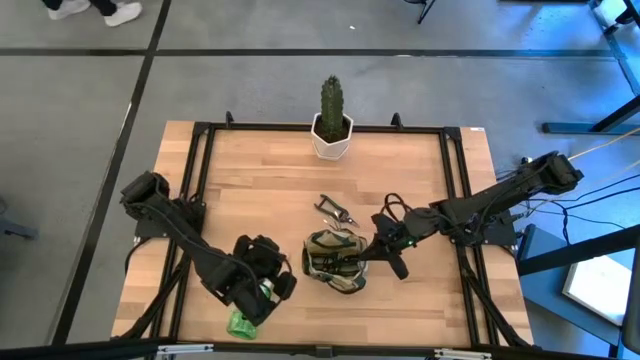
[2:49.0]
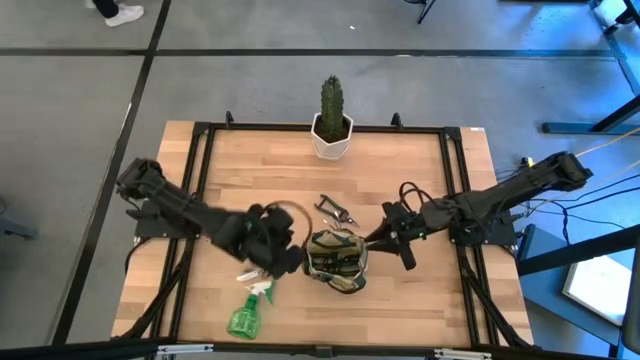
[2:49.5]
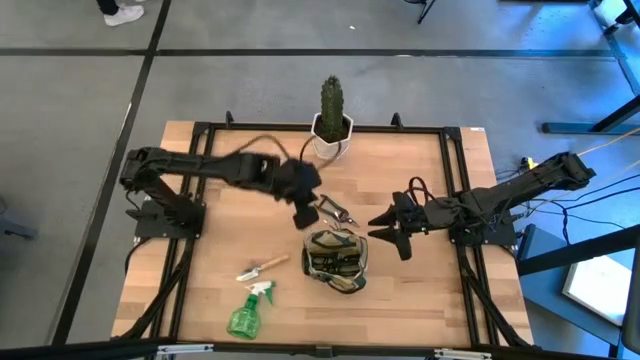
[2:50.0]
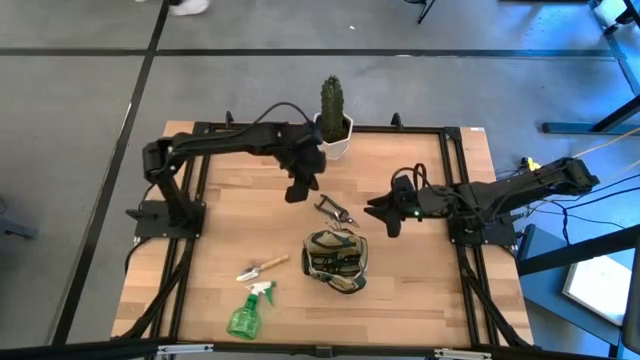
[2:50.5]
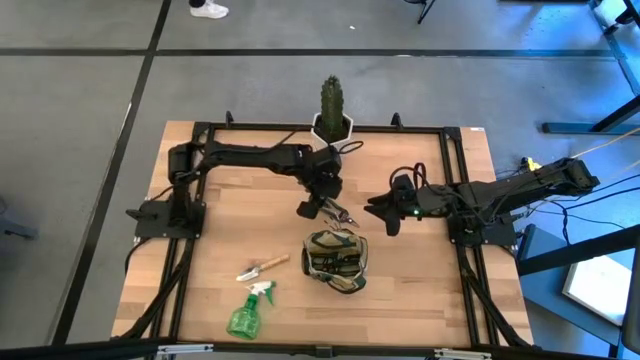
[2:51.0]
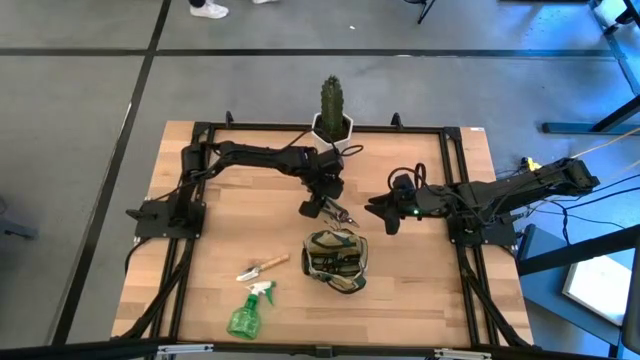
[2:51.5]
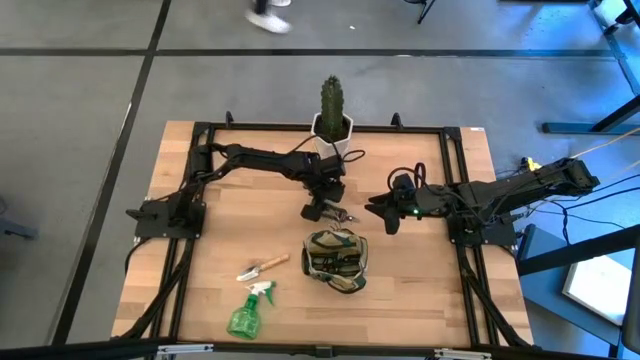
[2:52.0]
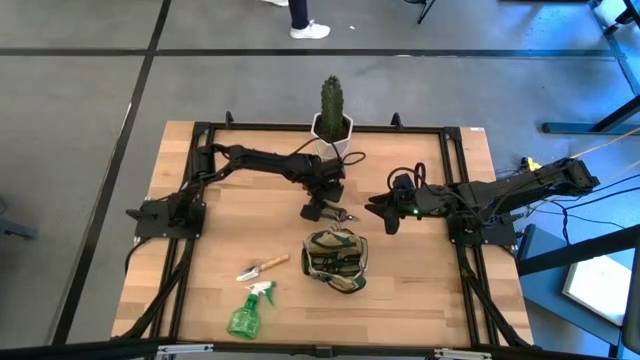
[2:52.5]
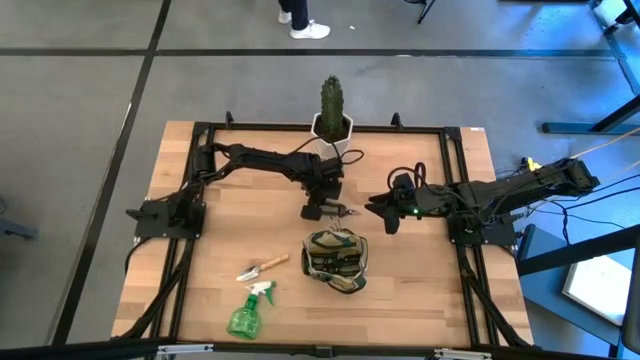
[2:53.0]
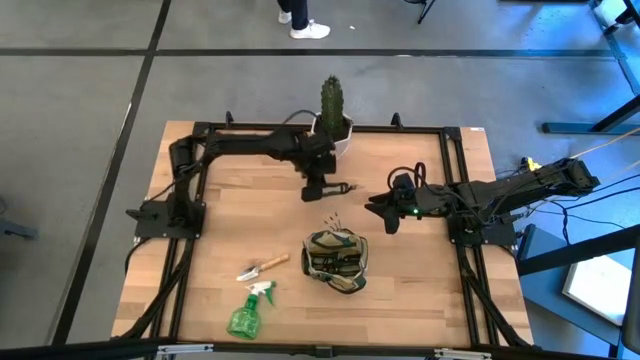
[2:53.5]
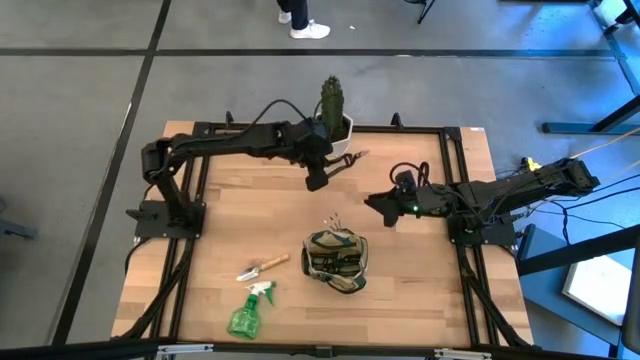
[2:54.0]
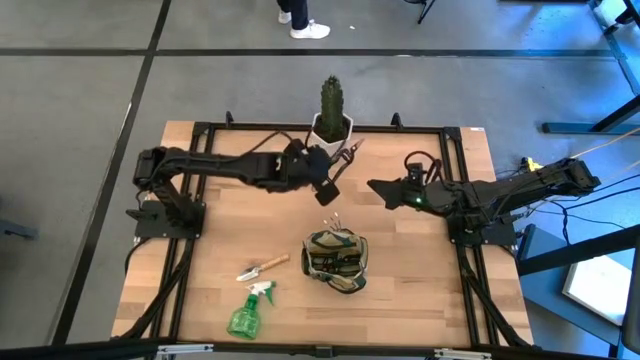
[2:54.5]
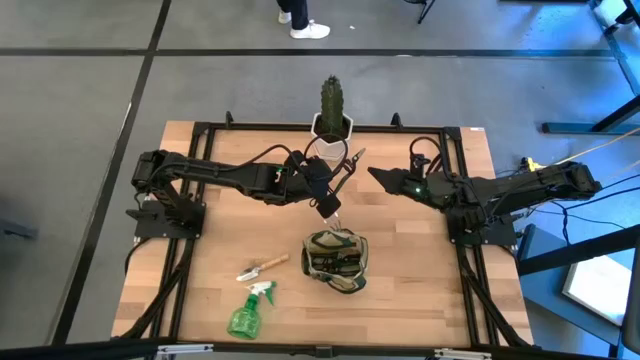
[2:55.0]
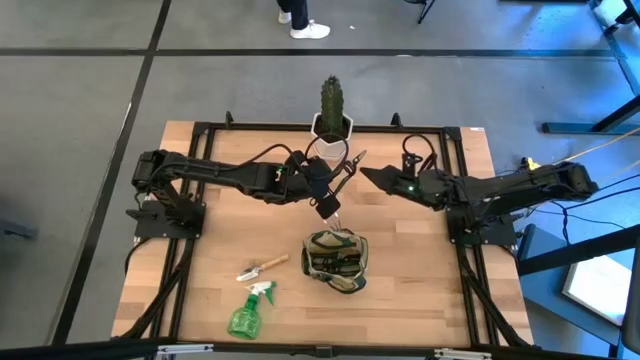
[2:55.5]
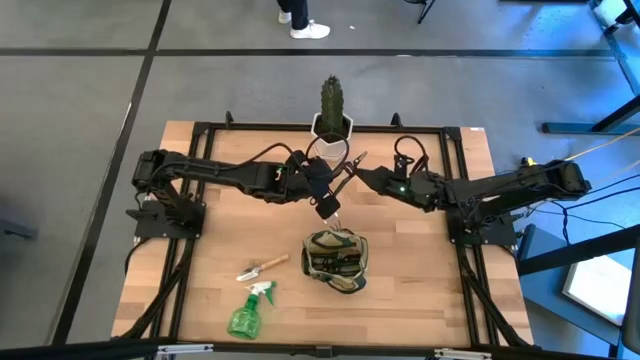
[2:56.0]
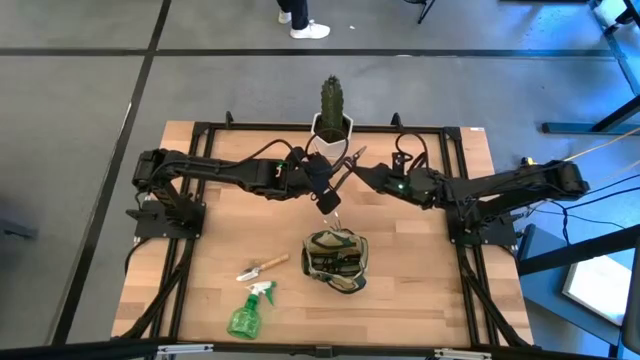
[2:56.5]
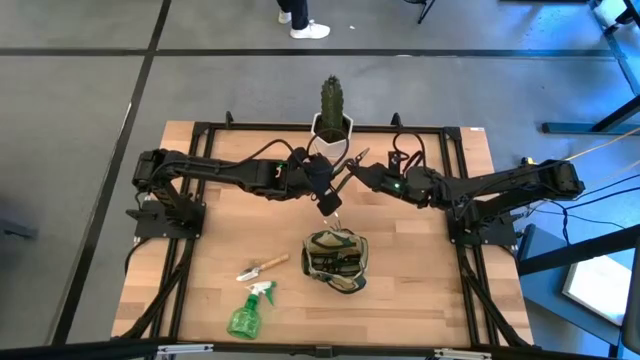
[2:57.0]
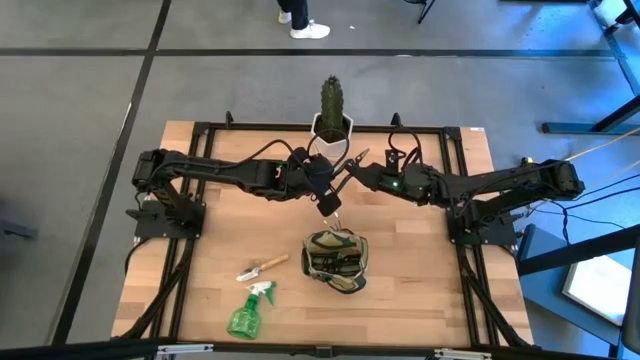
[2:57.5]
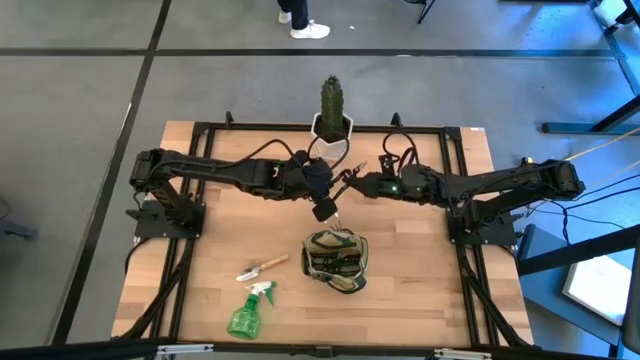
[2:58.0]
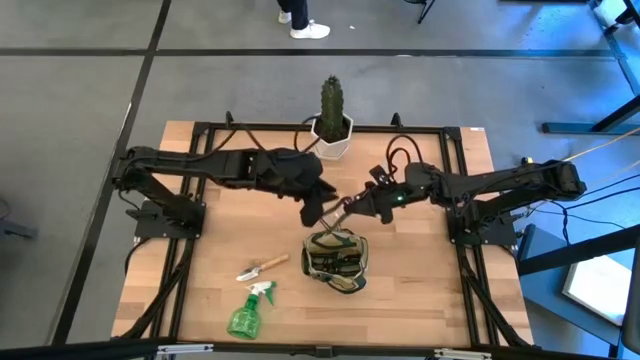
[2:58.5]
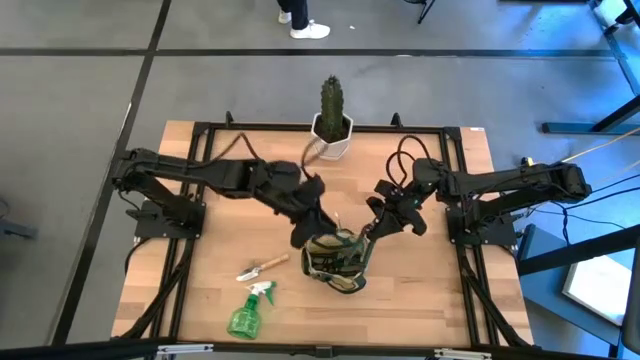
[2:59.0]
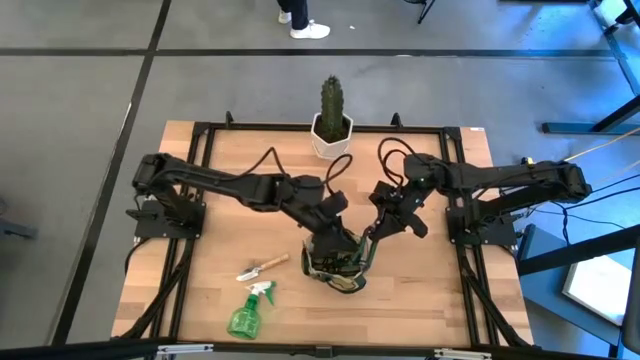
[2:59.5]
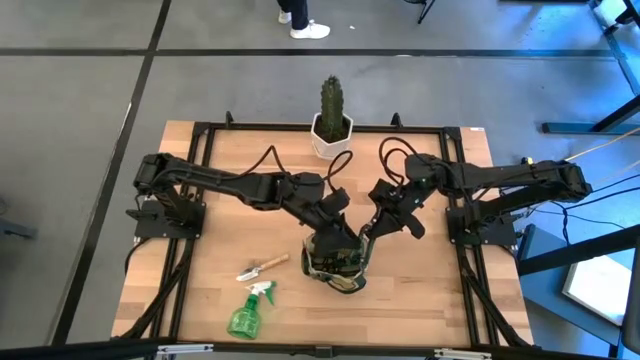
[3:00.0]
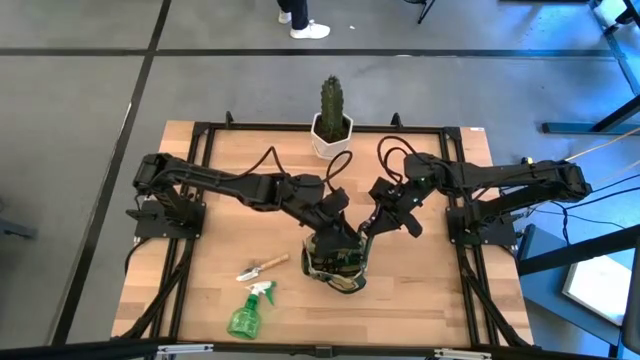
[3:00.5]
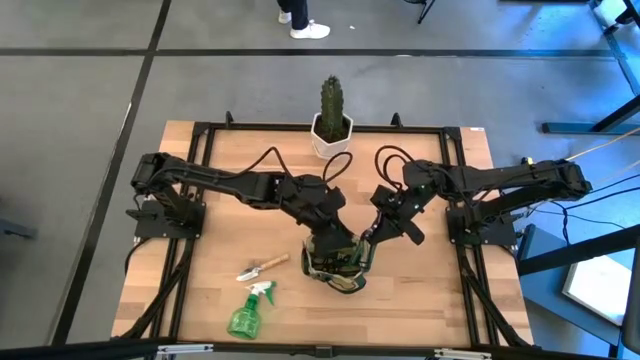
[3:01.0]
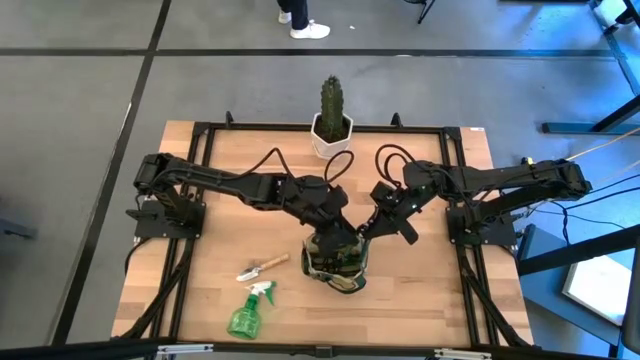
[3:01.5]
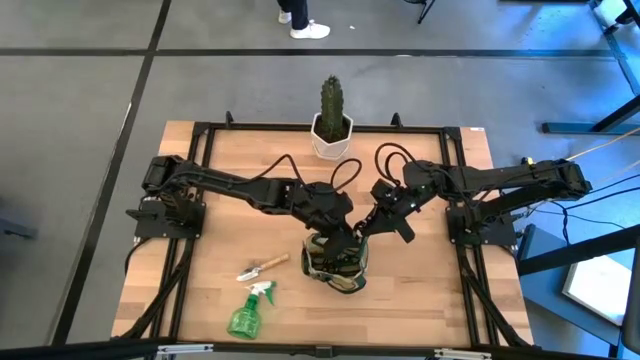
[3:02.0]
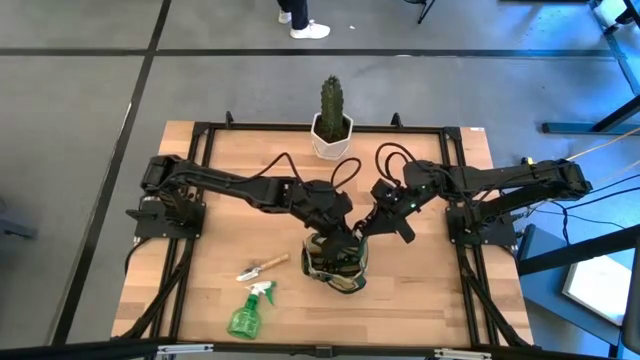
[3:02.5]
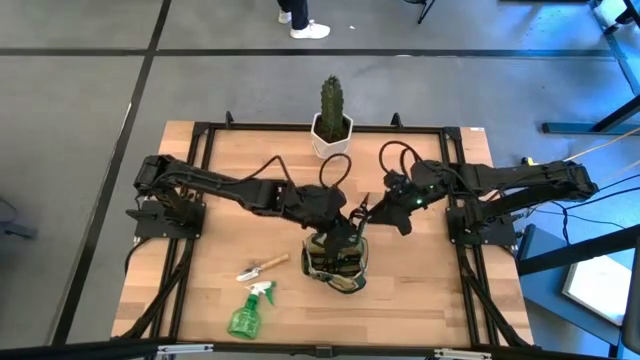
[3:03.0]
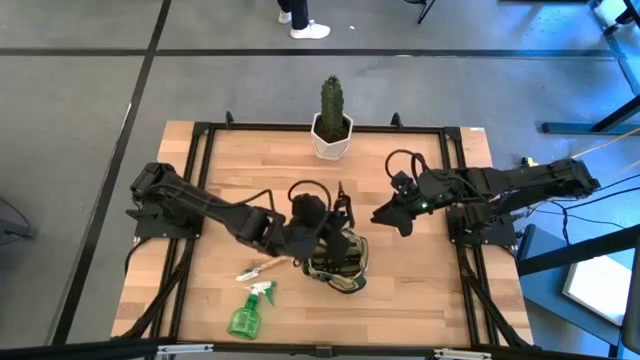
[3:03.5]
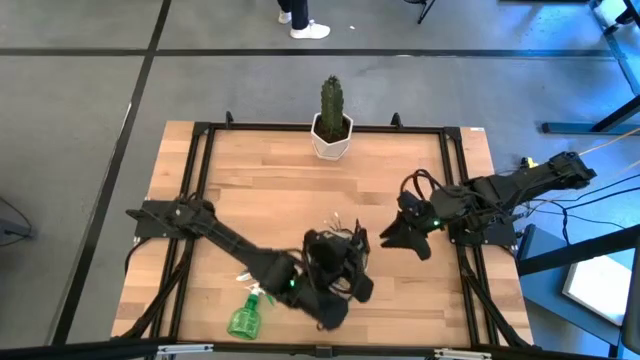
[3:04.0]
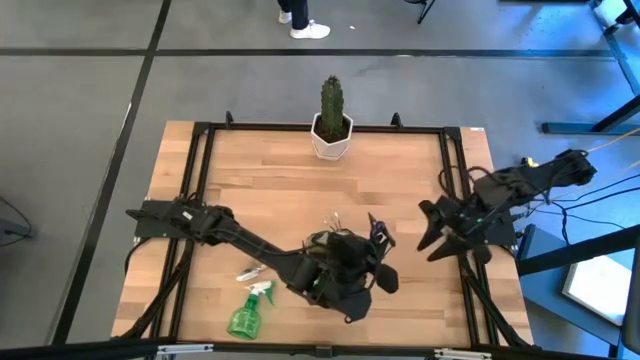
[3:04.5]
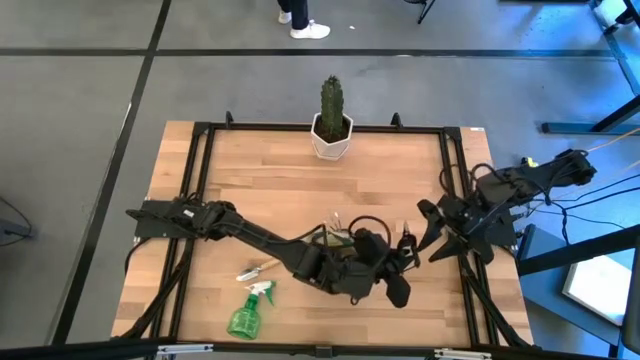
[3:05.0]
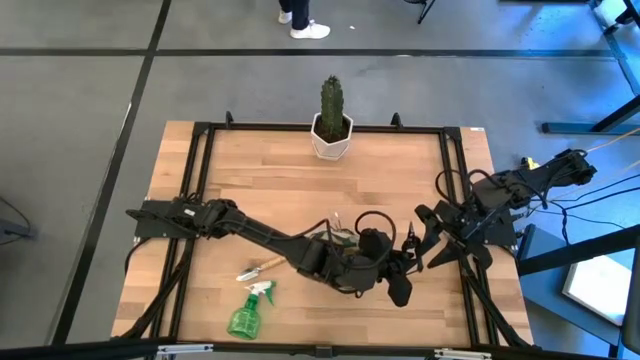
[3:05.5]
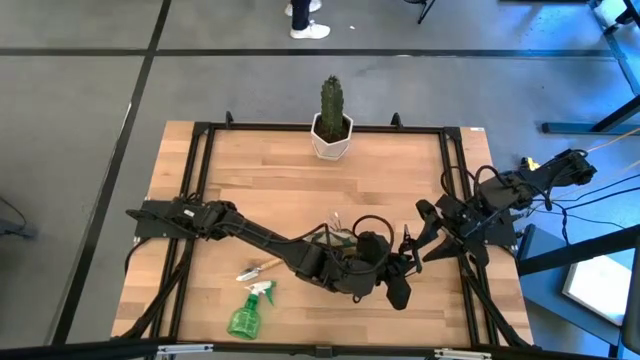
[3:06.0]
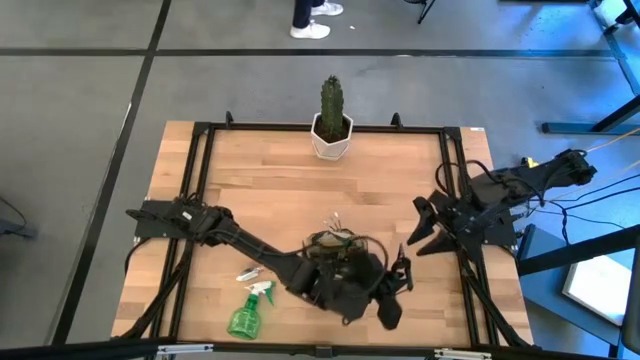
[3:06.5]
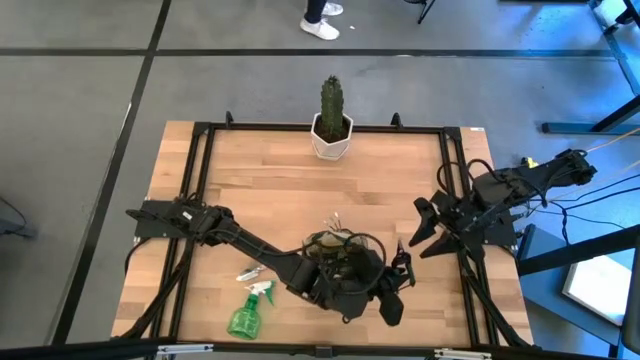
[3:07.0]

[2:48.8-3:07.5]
Task: Pick & Place Garden tools in Gardening bag
Put the green fruit pruner into the green gardening bag

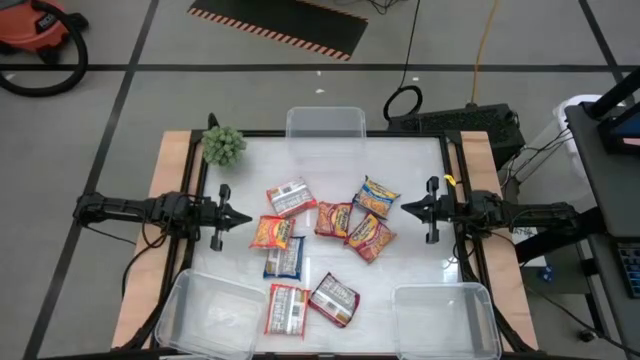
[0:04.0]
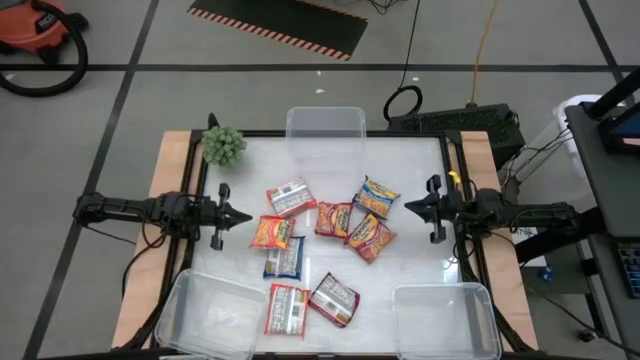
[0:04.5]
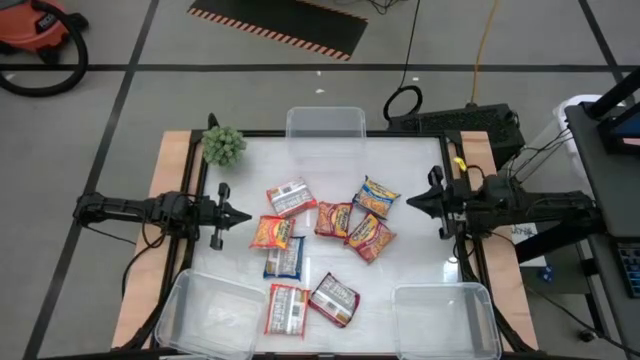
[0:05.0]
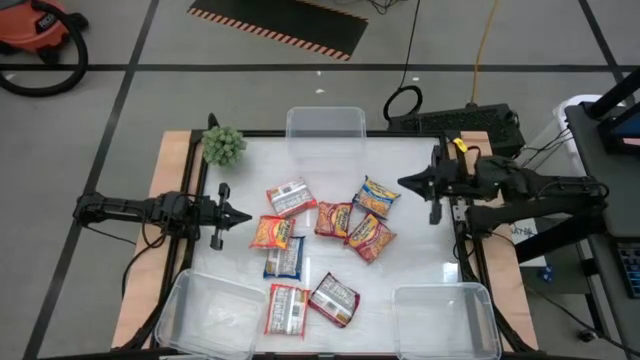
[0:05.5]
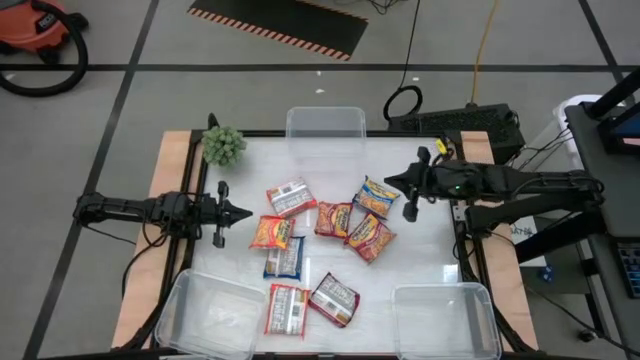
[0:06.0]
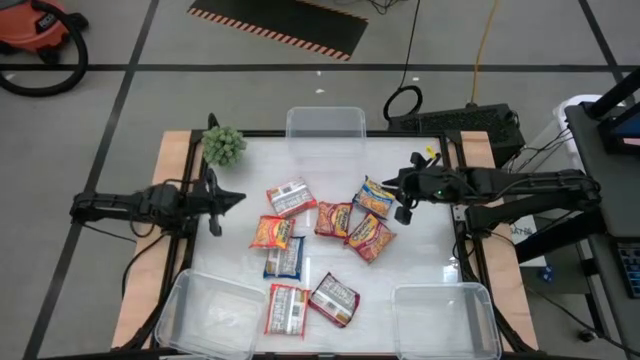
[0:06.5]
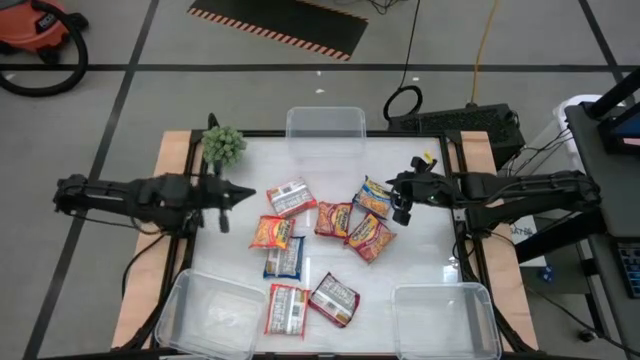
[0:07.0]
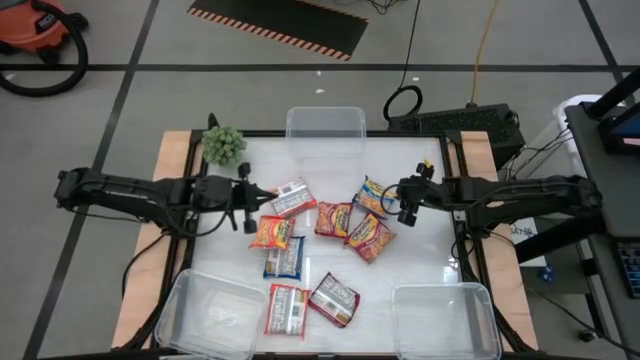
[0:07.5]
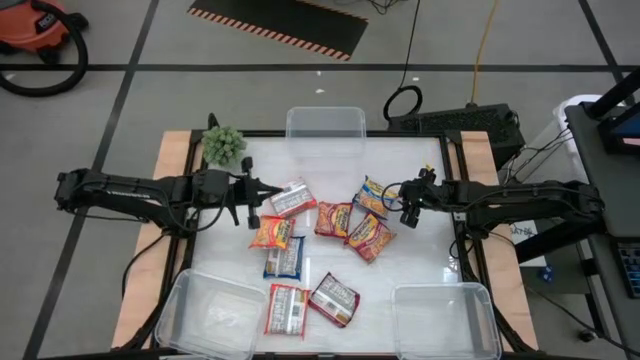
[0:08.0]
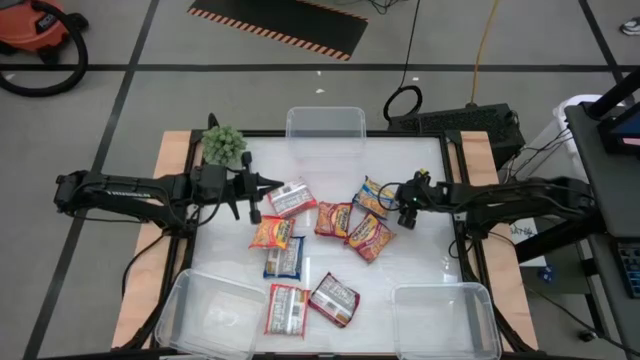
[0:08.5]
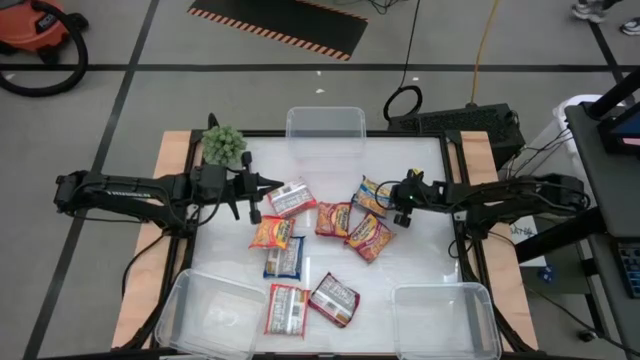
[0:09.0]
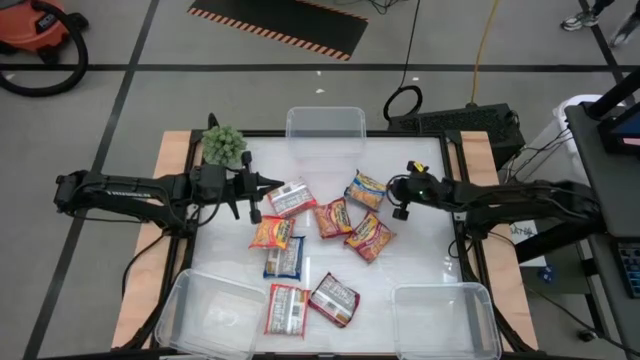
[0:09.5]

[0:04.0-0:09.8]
Task: Sort Maruchan noodles
Put the top blue noodle pack into the top transparent bin
